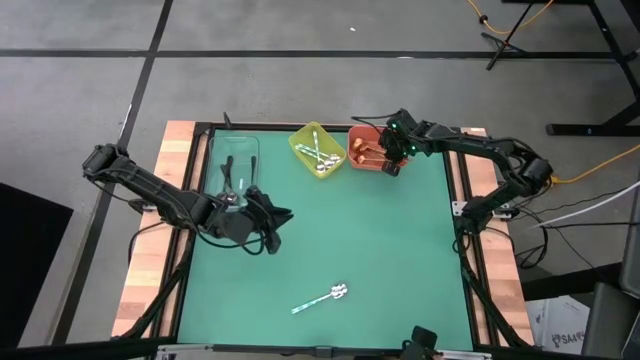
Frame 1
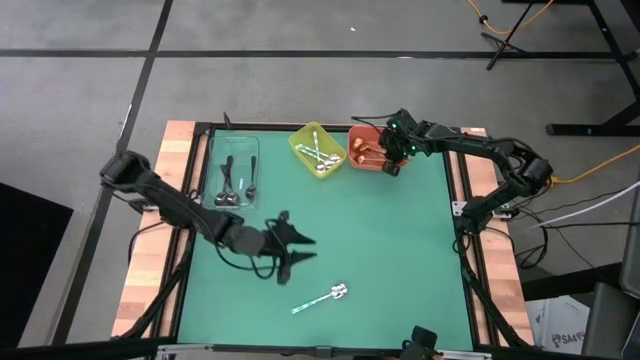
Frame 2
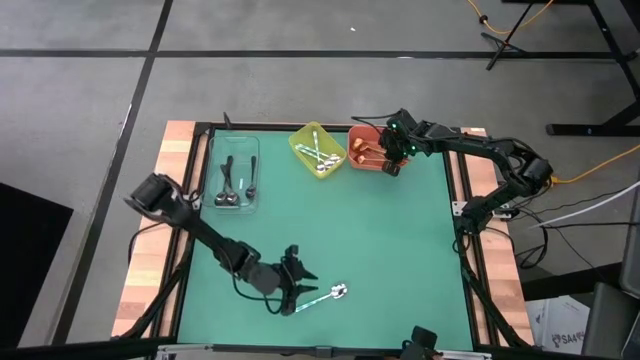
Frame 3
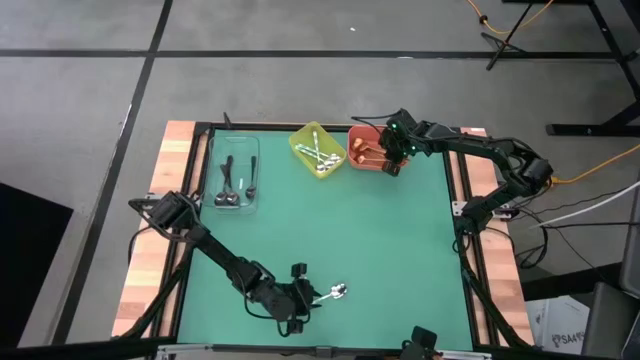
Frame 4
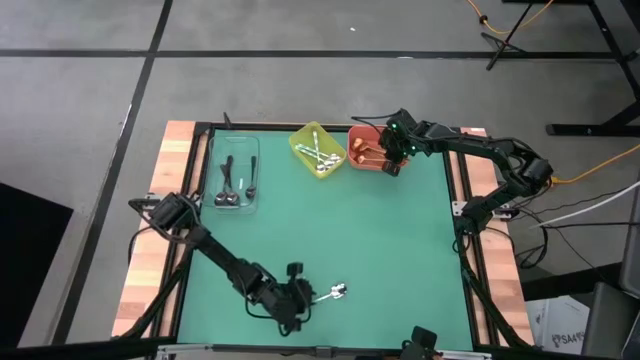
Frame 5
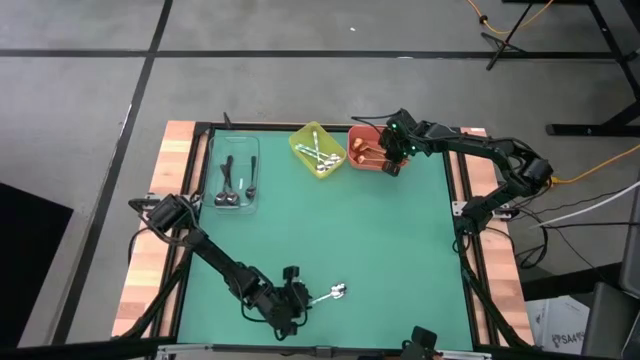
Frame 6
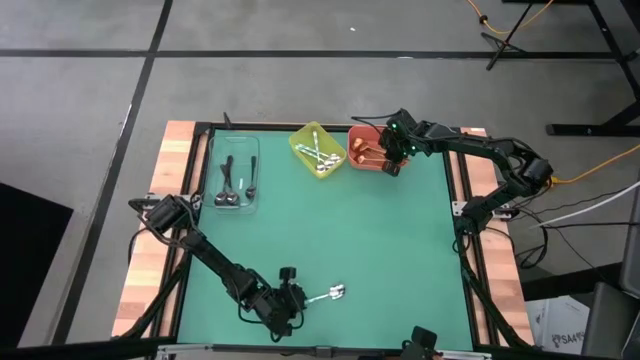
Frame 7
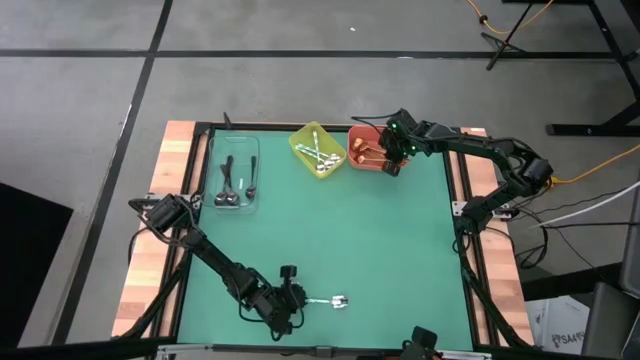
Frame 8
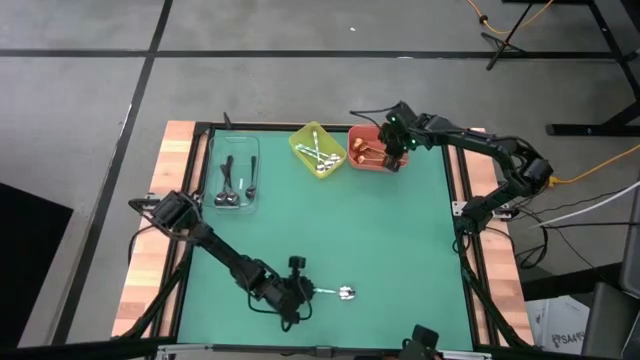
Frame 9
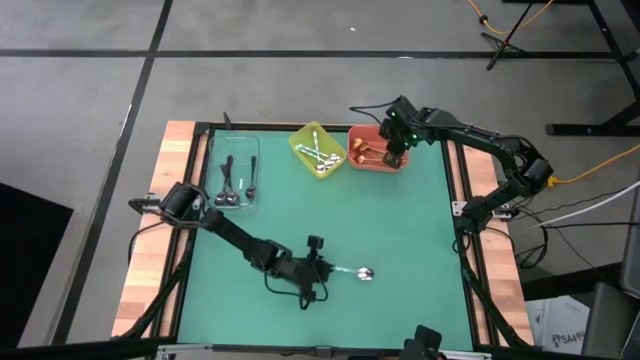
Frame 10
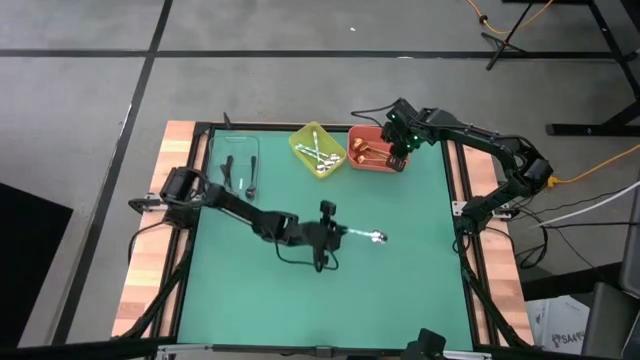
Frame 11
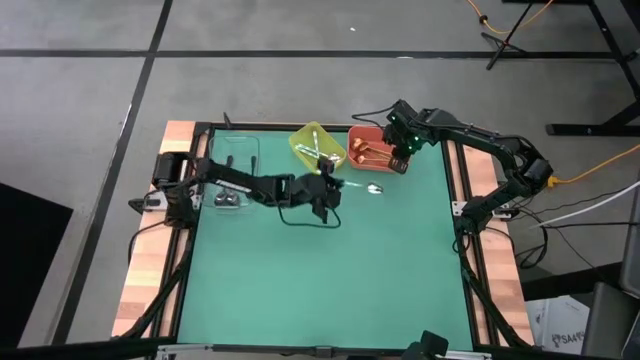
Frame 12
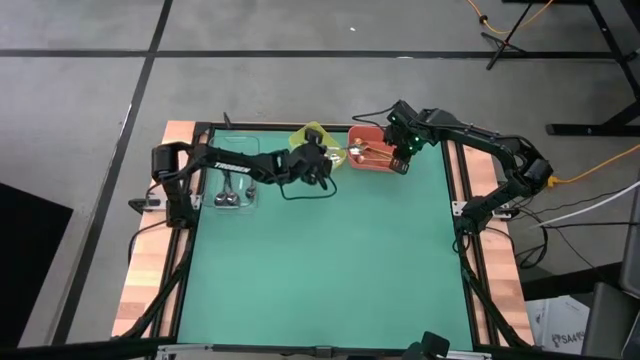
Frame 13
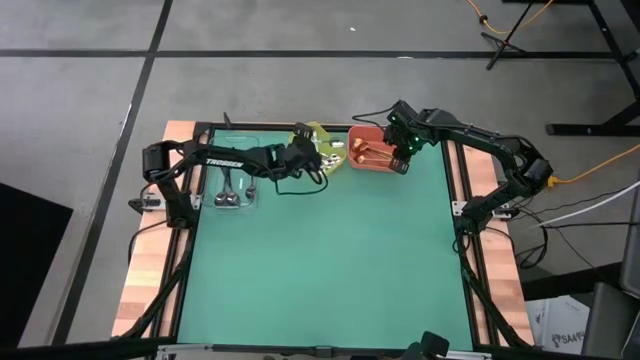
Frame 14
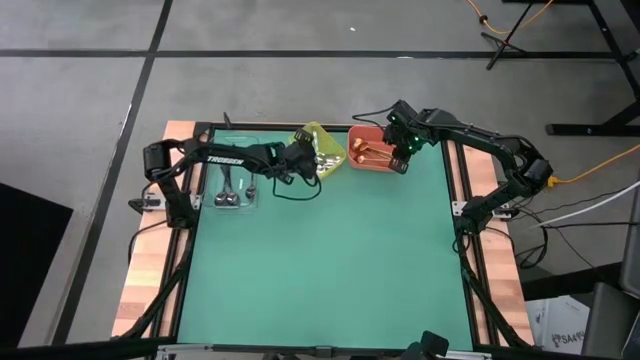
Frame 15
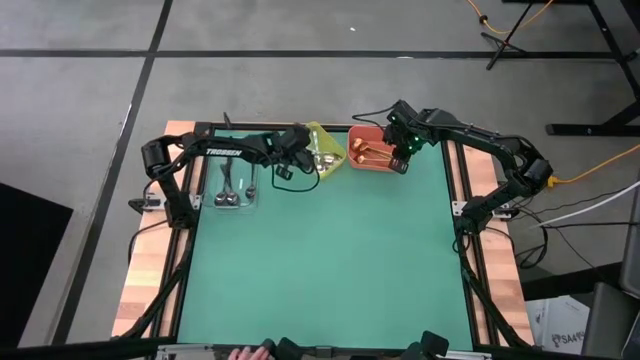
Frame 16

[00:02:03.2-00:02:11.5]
Task: Sort silverware by color (type)
Put the blue spoon into the green bin

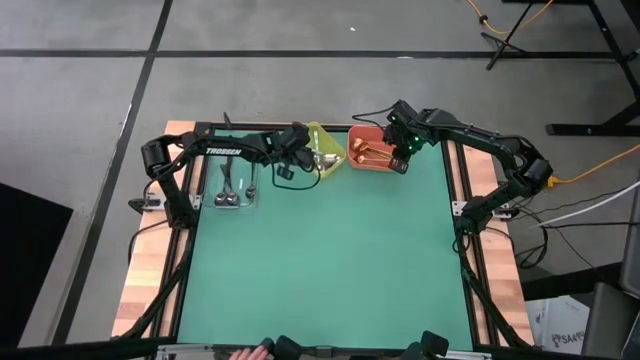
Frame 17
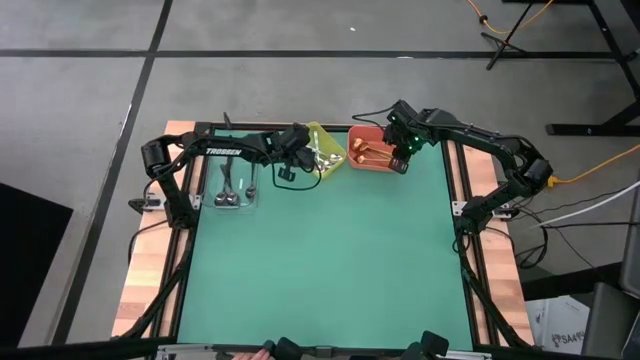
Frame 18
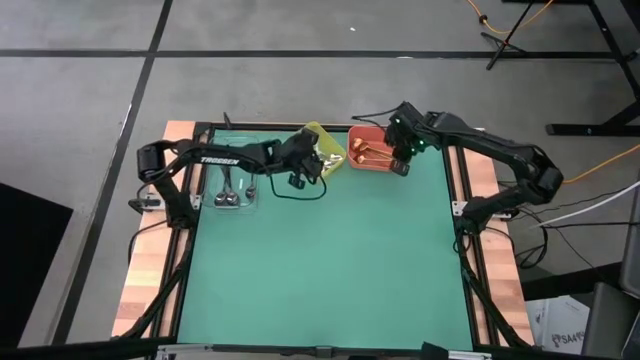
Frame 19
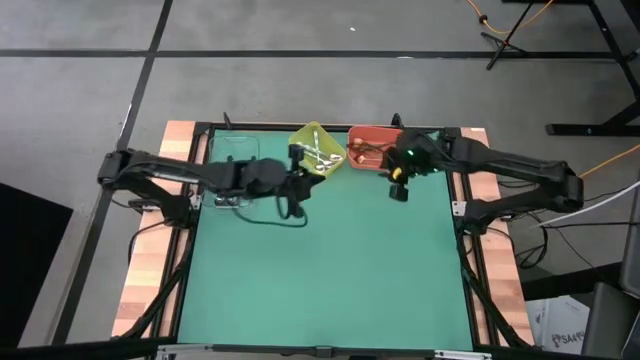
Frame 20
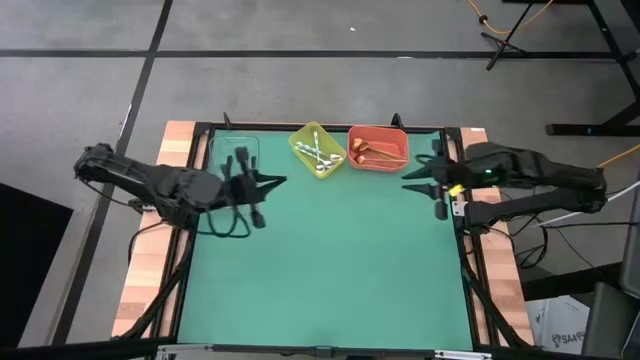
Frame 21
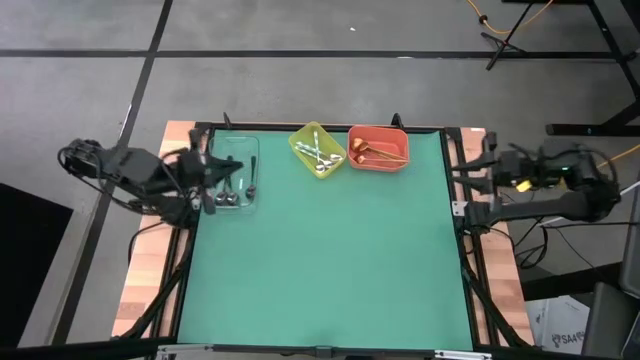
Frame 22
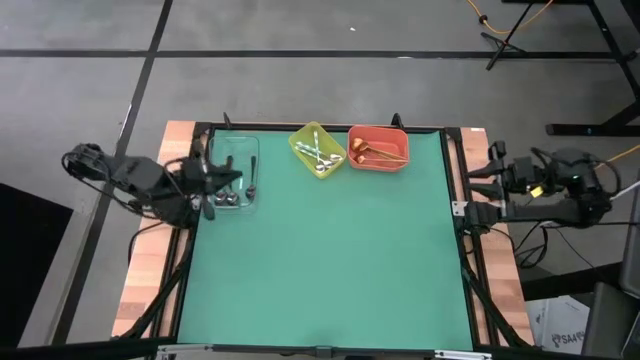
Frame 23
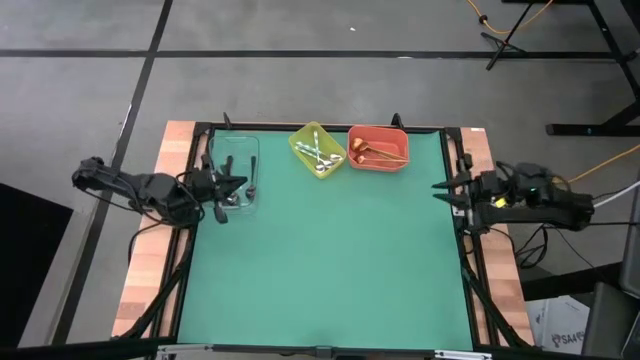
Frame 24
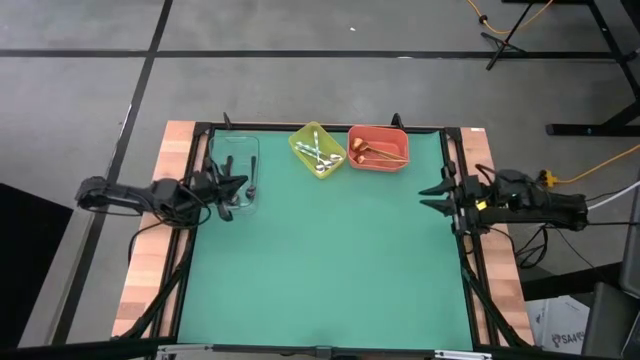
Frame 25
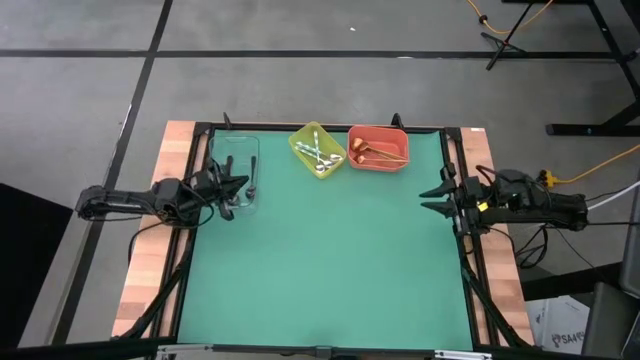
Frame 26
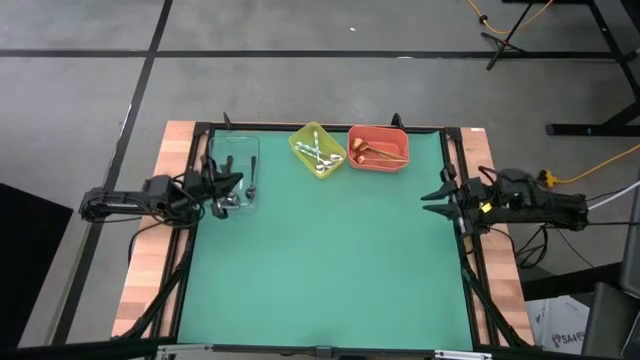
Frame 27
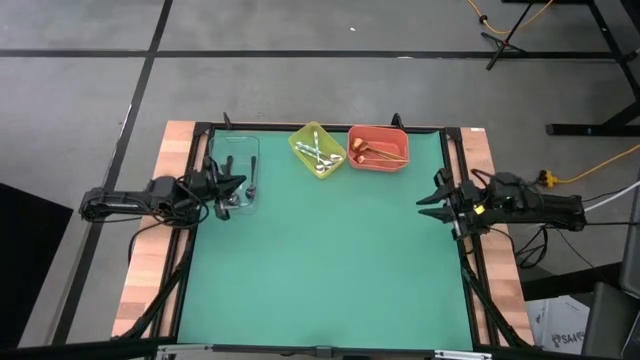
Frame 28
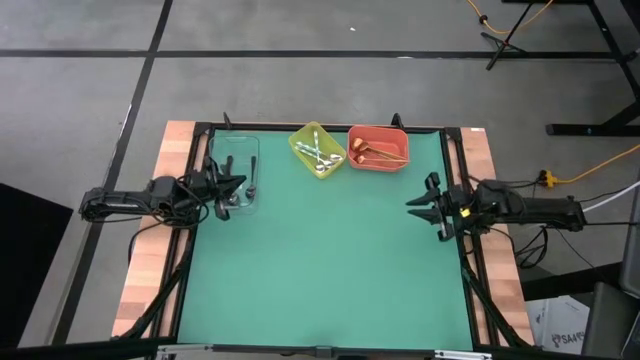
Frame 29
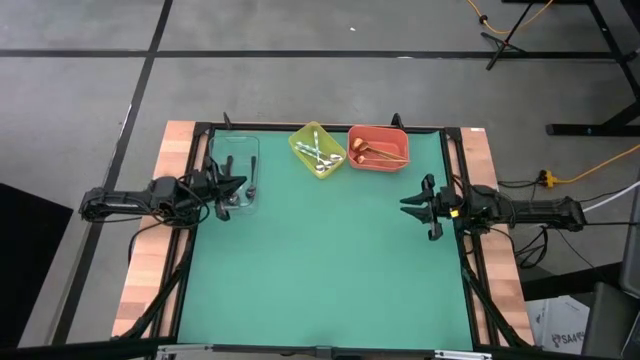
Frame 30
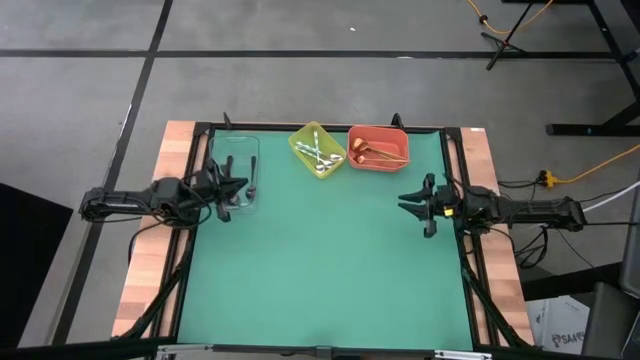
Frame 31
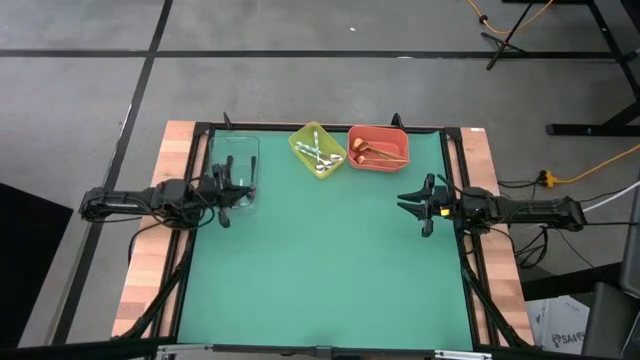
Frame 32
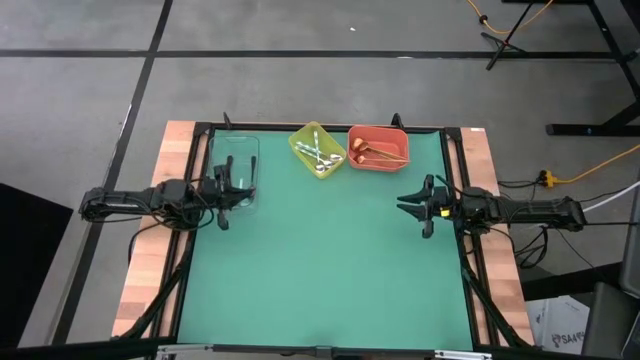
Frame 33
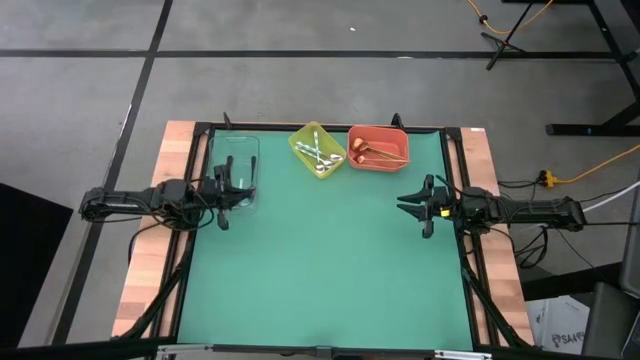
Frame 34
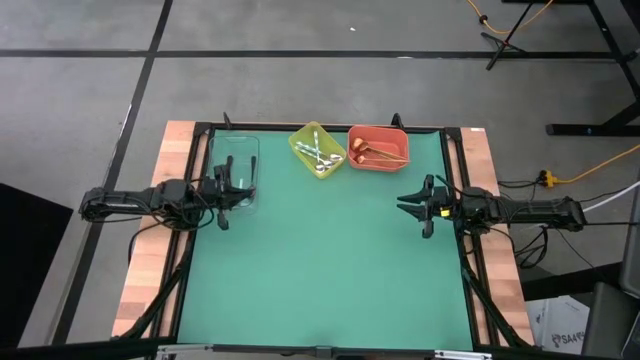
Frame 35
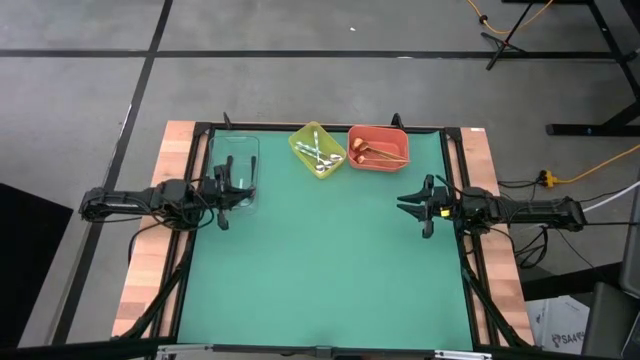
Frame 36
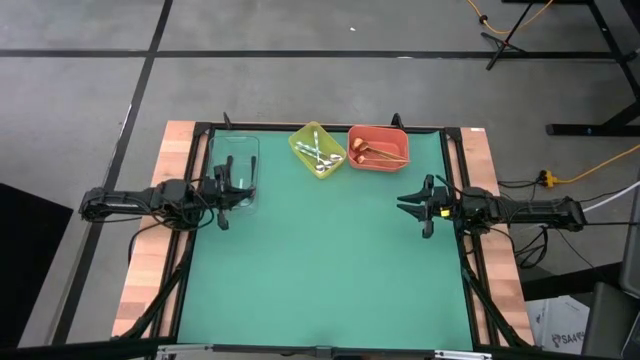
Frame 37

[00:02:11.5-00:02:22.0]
Return to Home Position

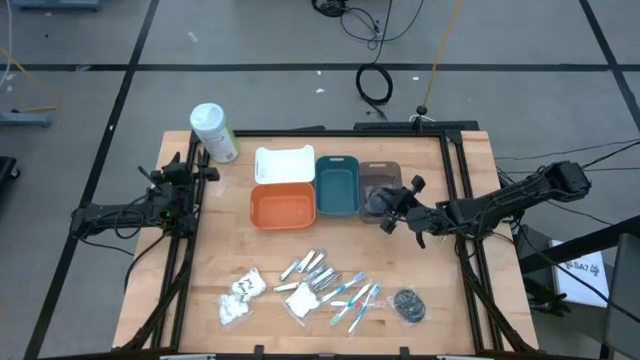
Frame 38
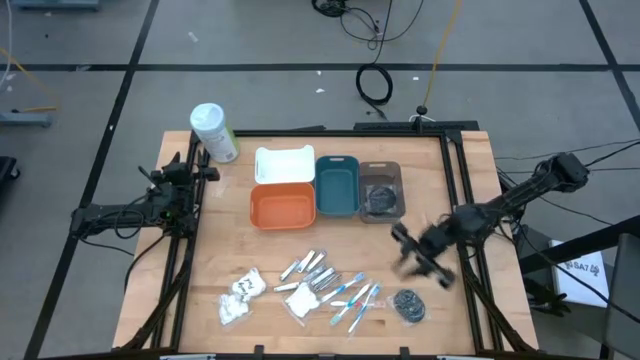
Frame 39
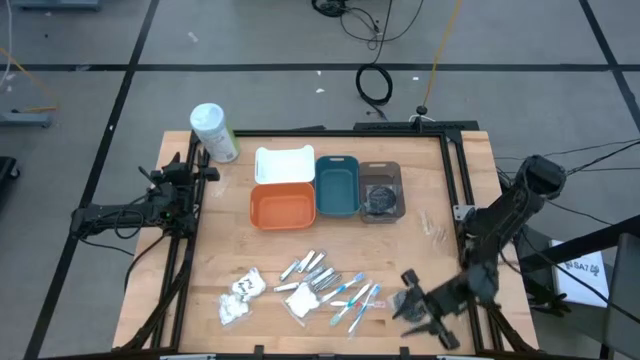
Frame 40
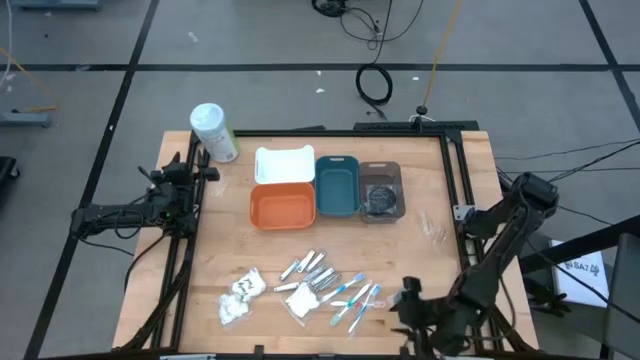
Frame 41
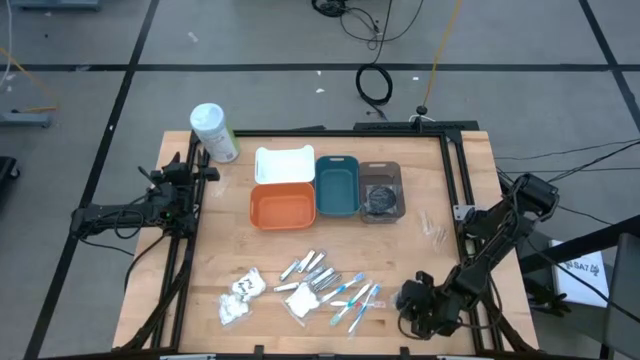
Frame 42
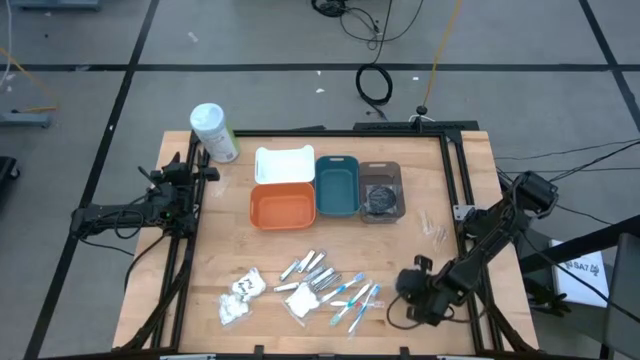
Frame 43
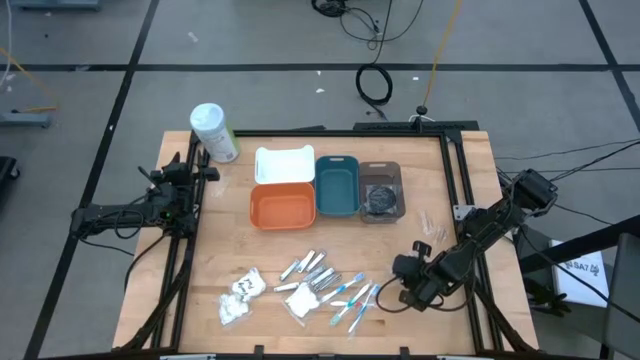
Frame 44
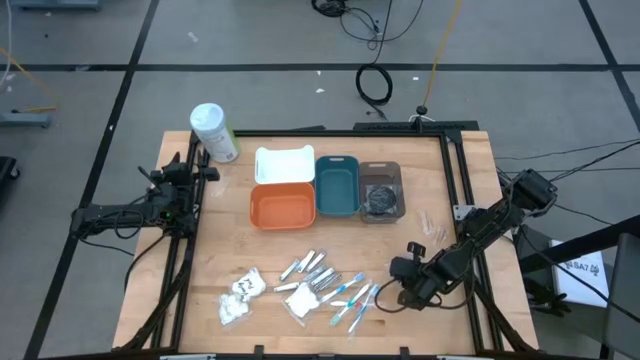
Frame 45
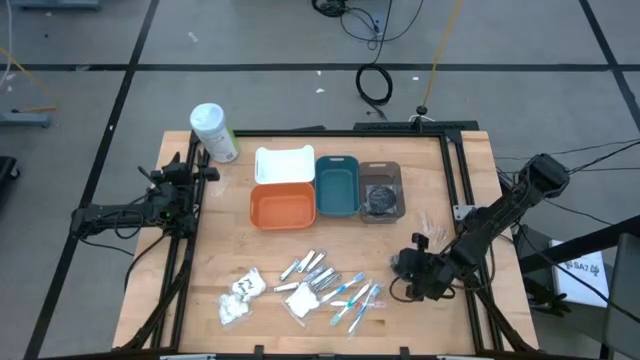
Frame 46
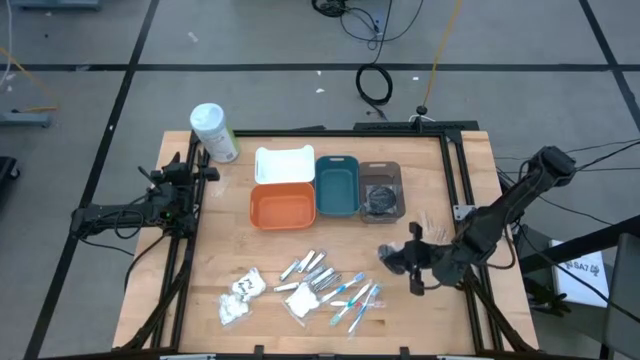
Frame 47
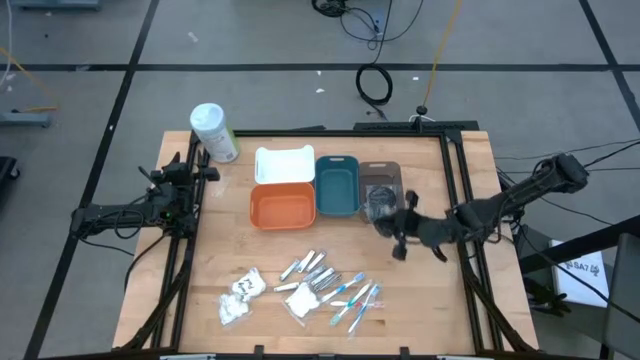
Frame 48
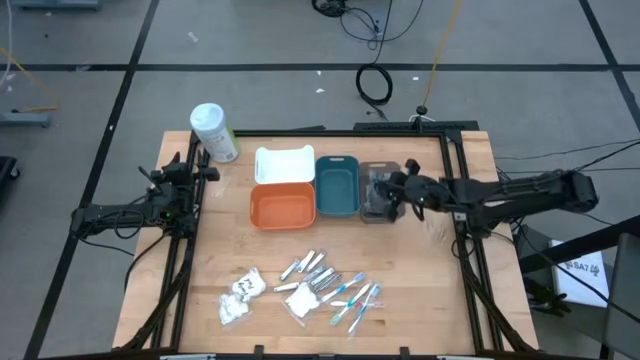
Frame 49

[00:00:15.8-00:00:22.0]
Task: Pick & Place Travel size toiletries
Put the black hairbrush into the transparent black bin
